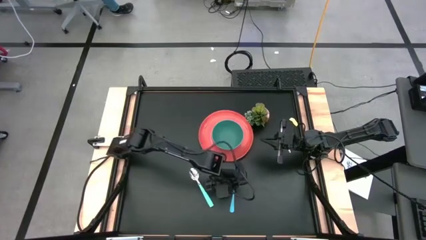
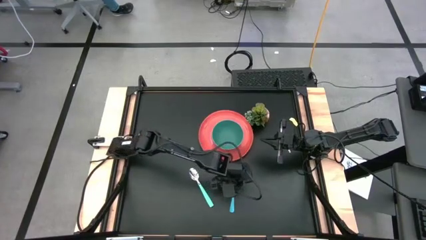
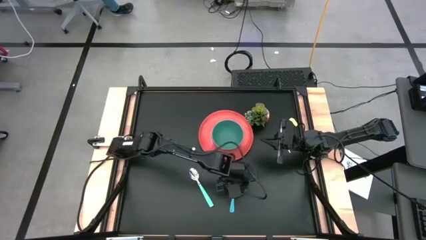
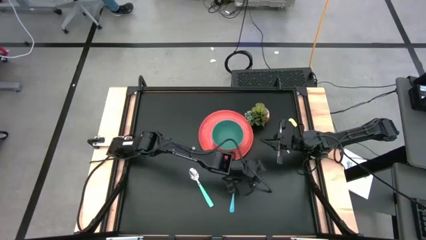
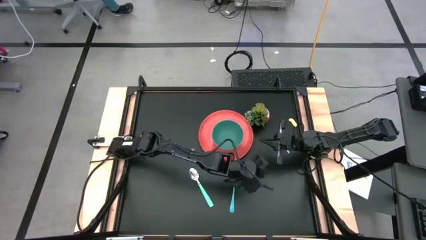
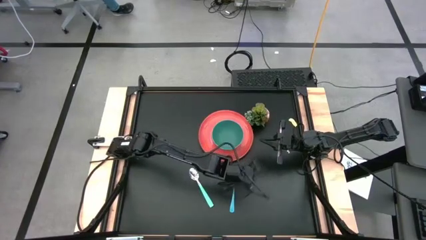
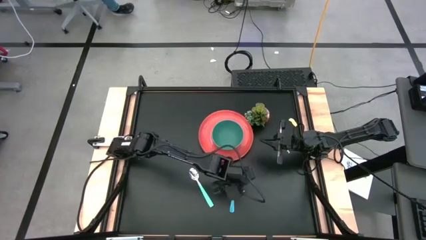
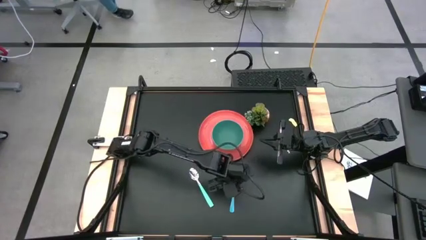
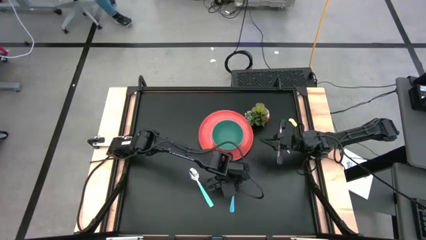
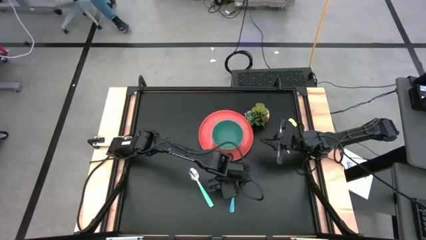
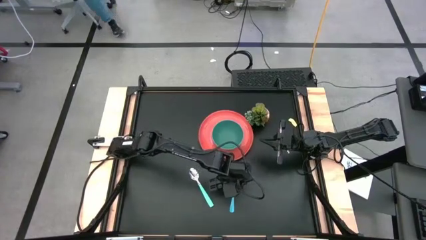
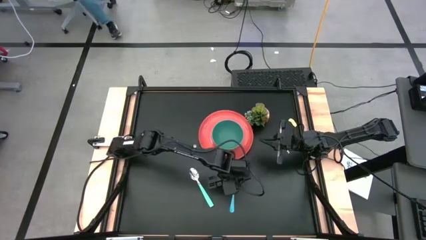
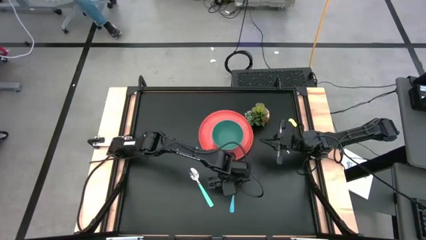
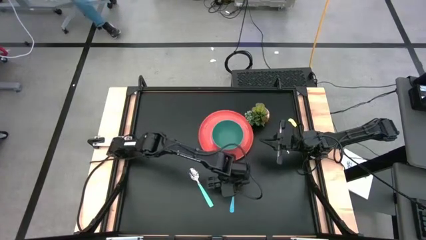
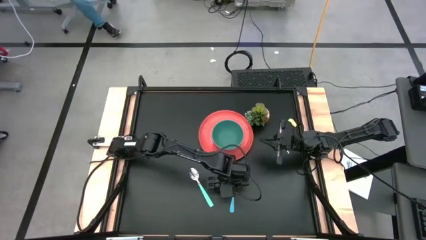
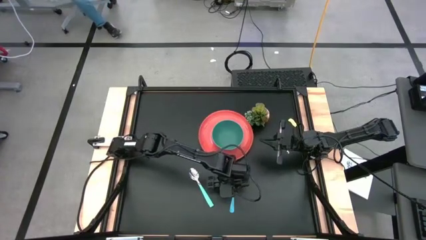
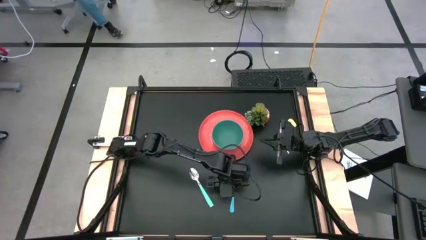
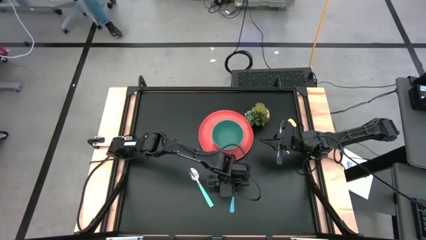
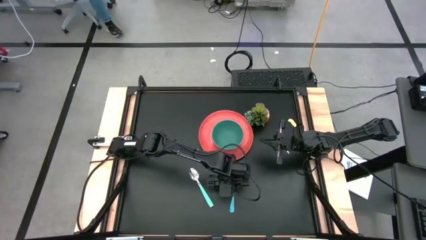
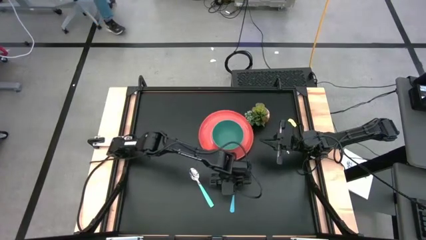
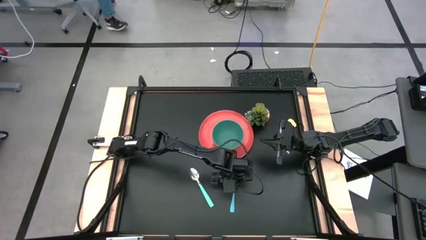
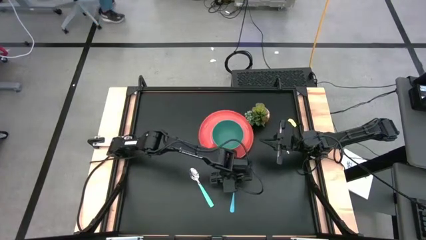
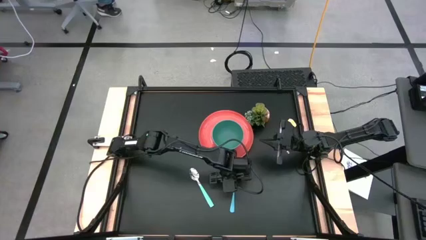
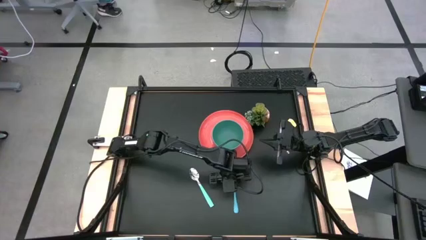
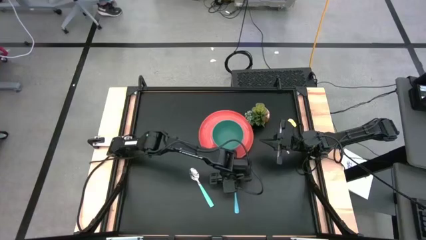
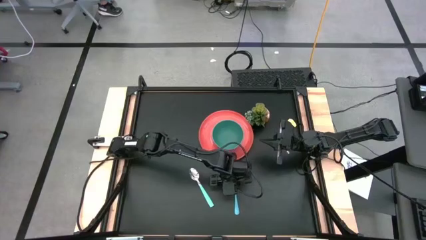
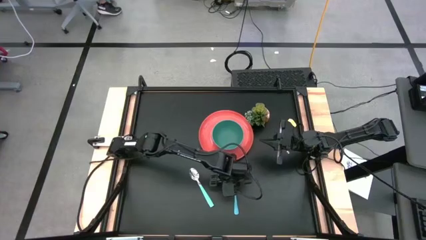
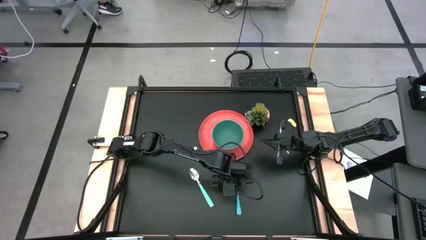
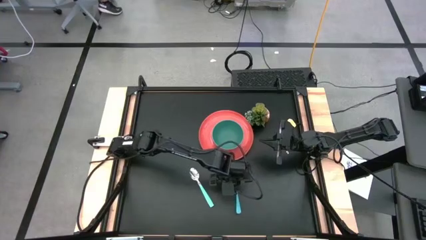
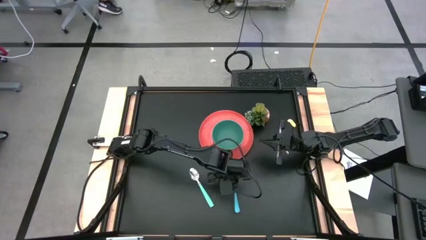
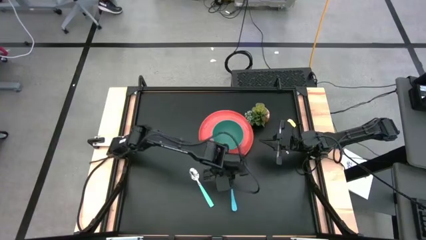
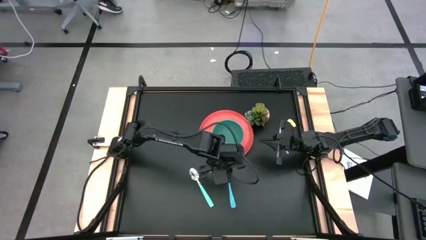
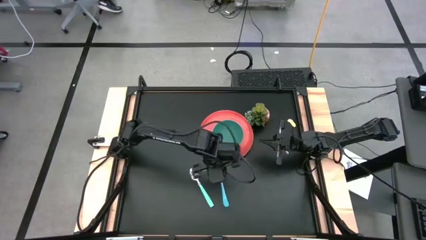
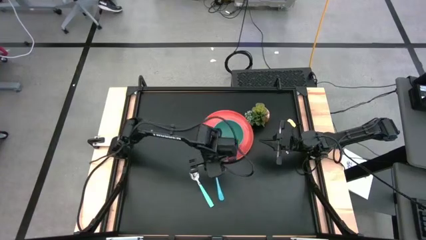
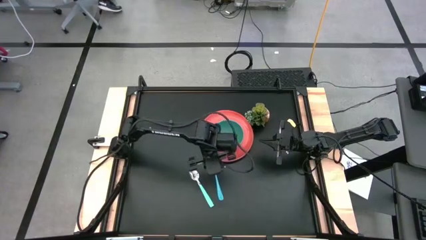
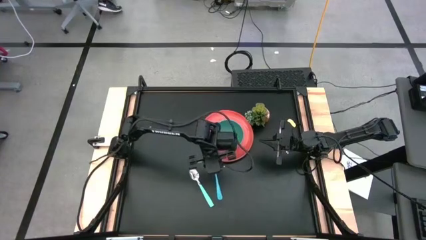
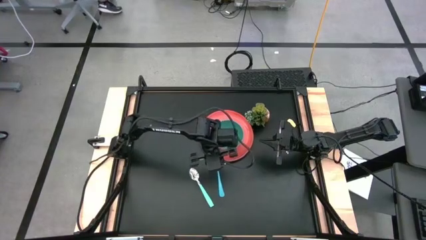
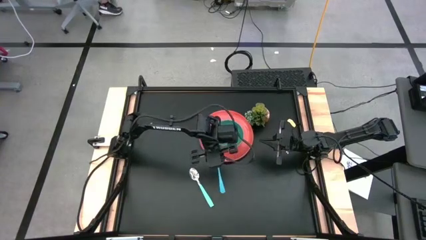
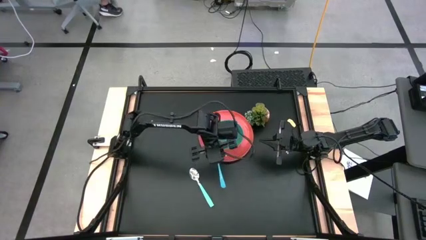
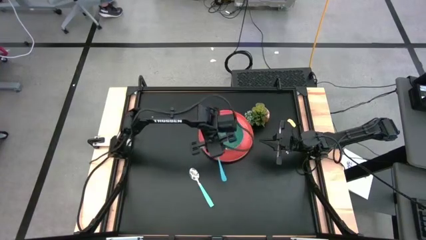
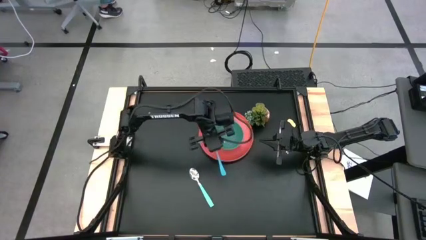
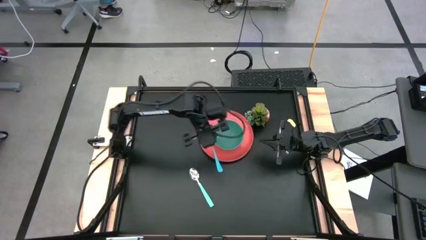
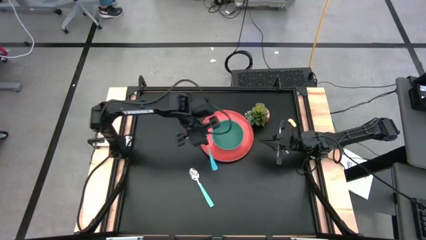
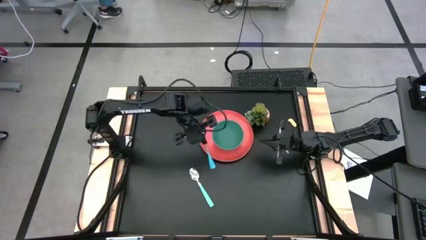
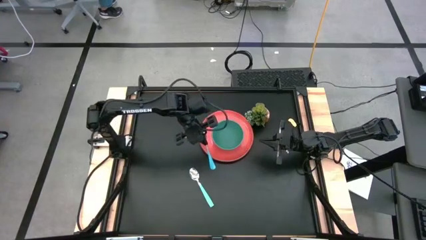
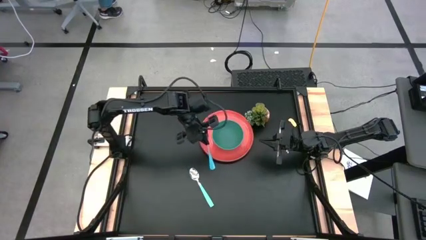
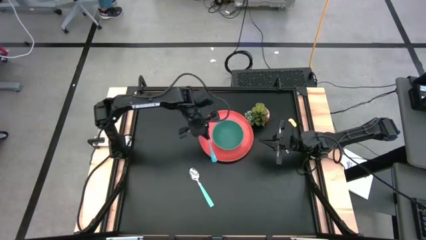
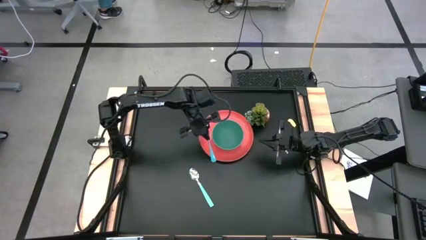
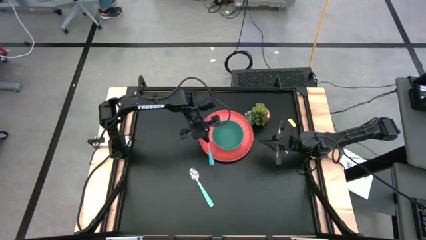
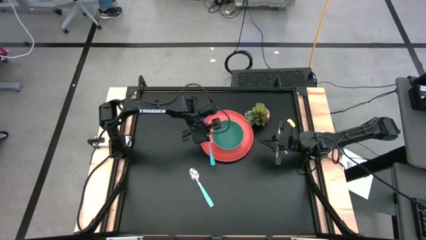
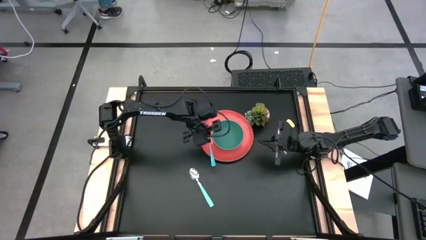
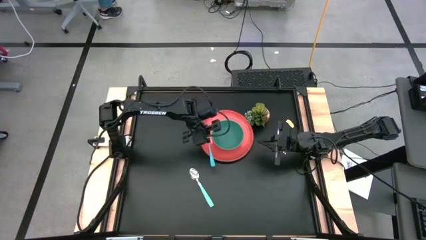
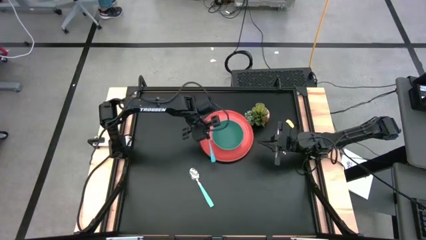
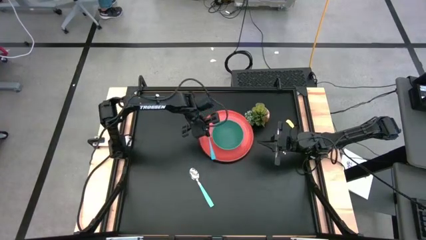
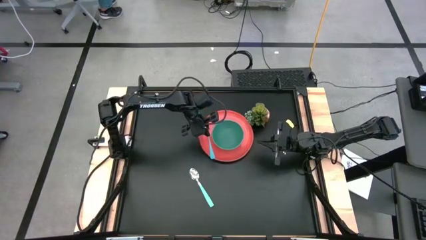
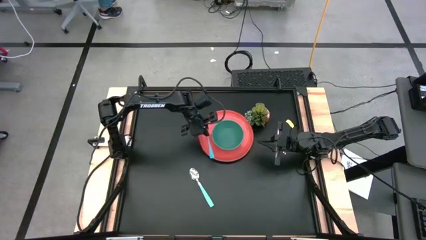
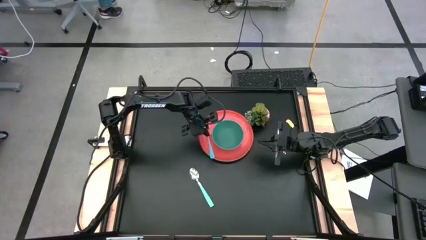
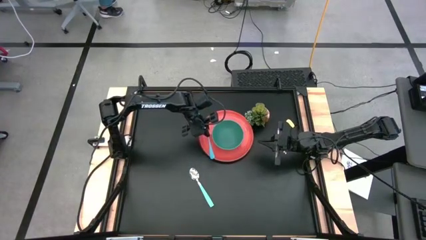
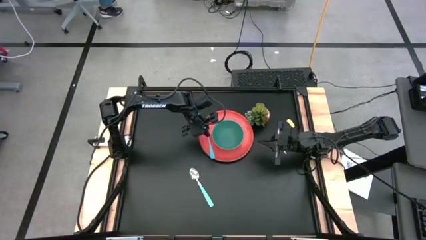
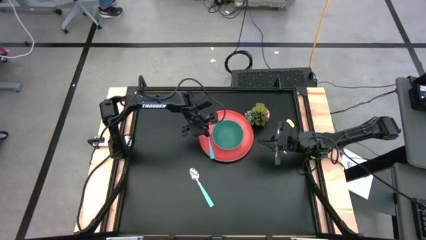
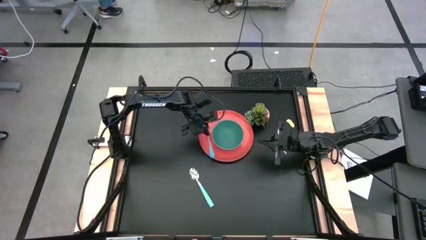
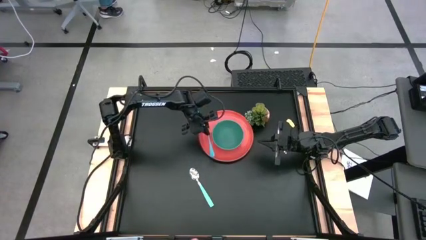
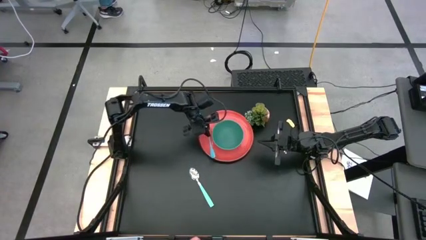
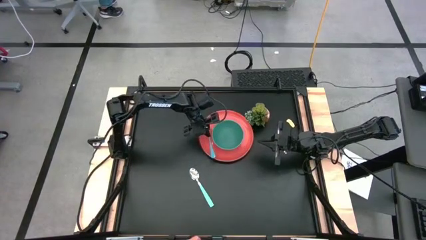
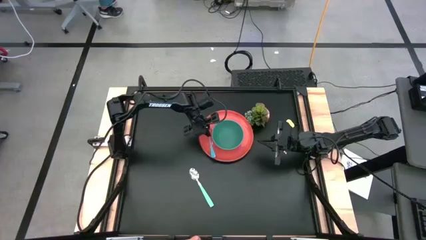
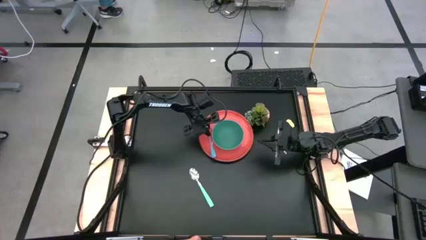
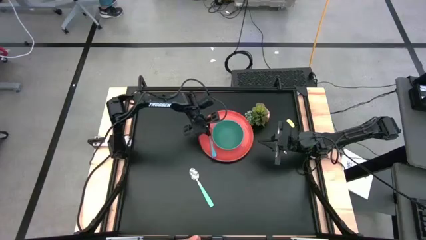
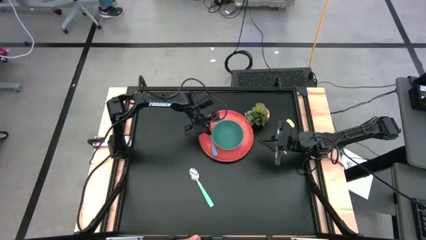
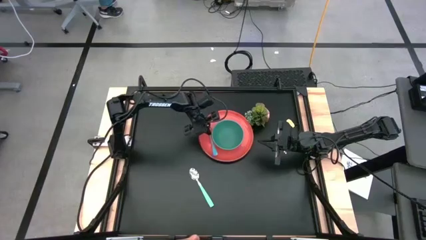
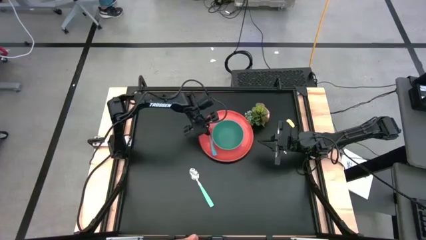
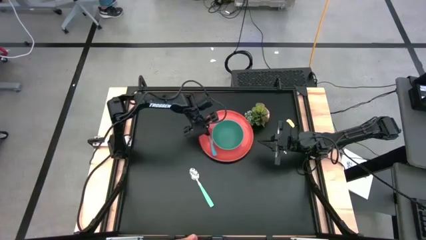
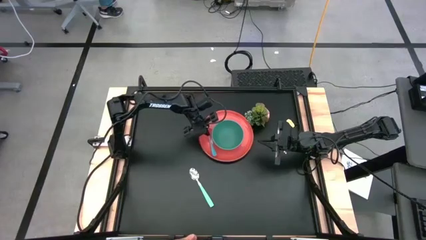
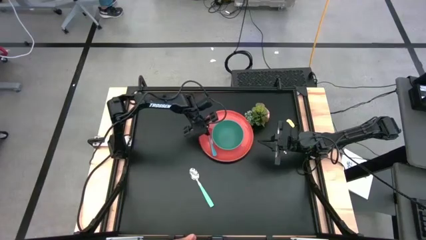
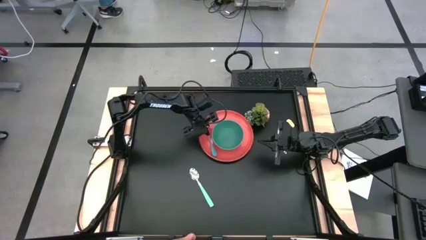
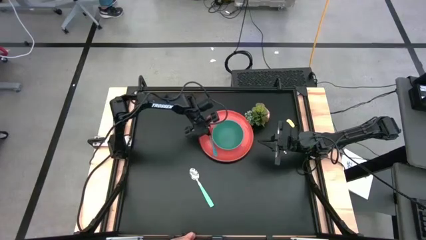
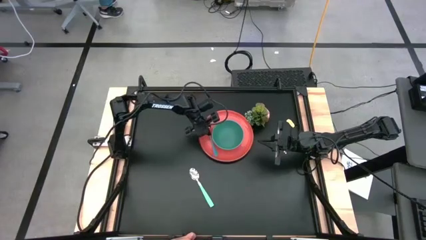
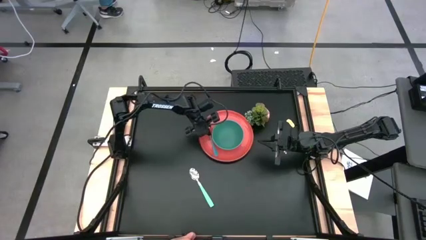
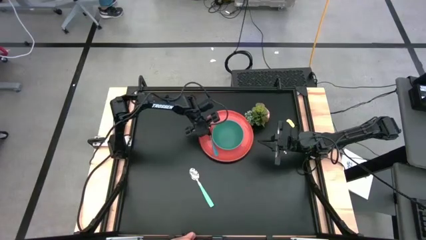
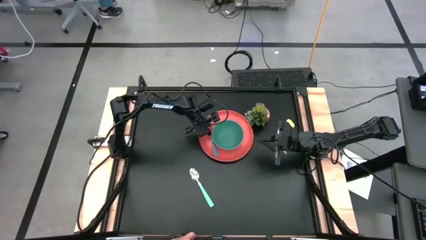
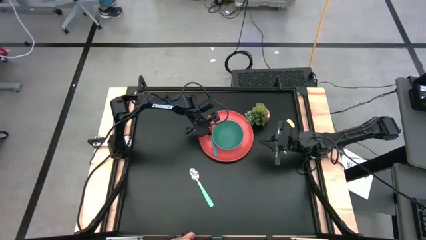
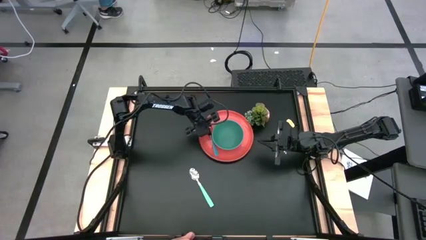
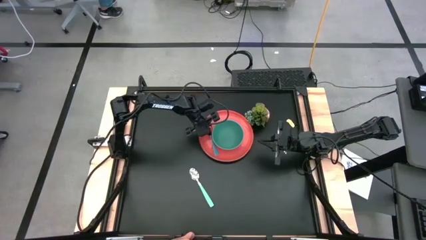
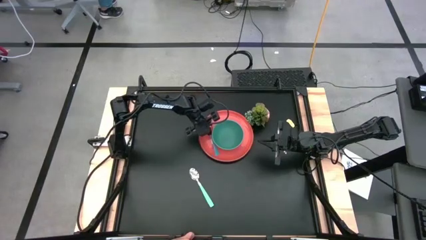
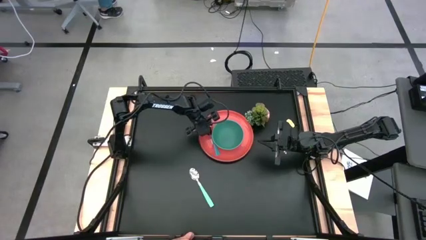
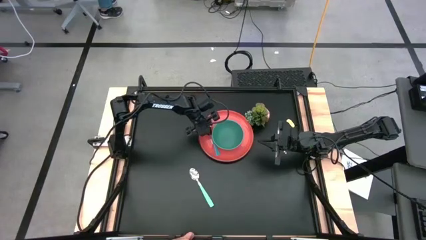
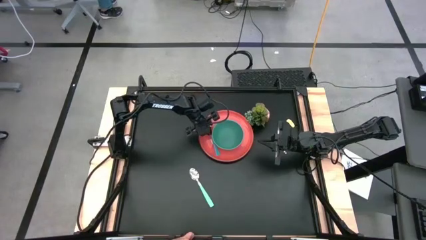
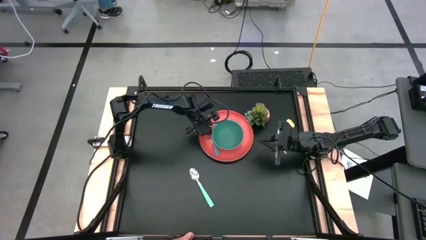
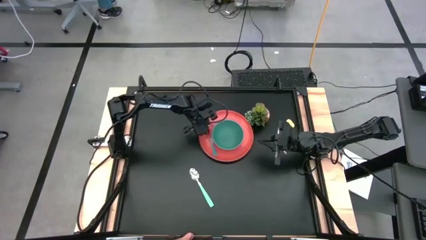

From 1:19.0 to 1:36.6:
Task: Set table place
Put the blue fork on the right side of the green bowl
